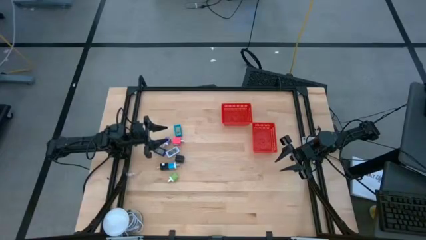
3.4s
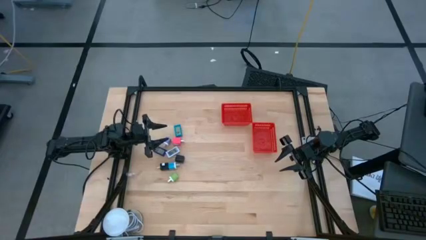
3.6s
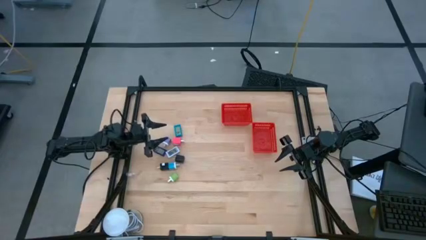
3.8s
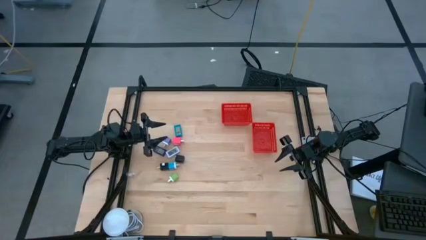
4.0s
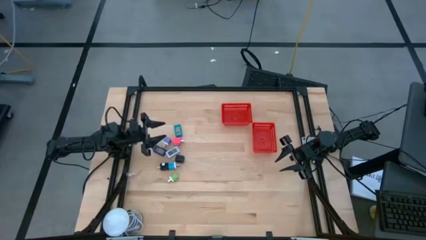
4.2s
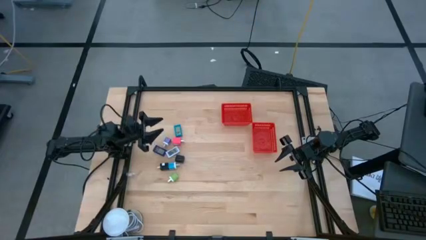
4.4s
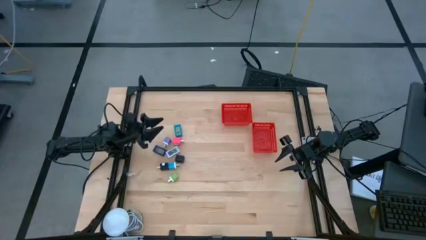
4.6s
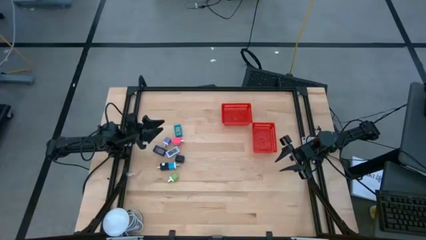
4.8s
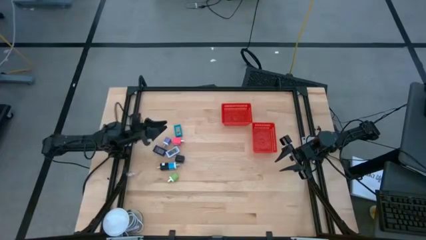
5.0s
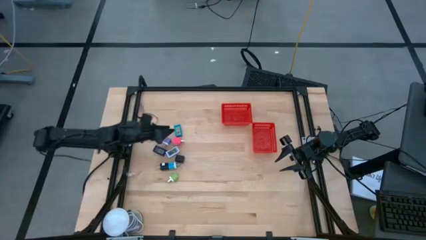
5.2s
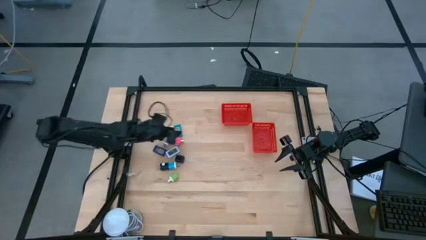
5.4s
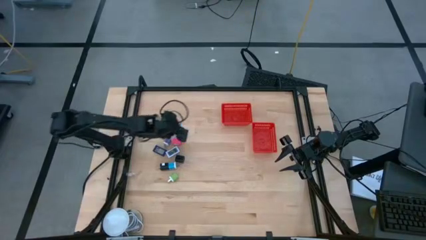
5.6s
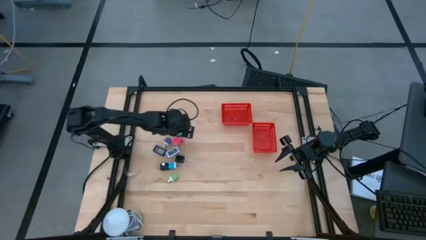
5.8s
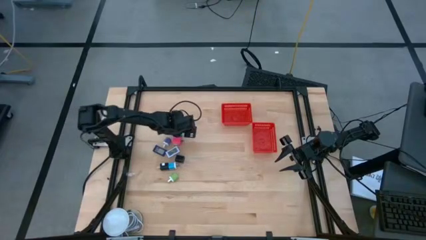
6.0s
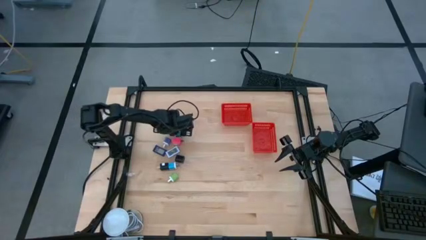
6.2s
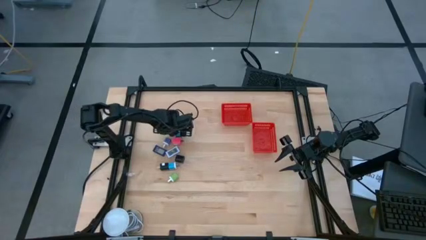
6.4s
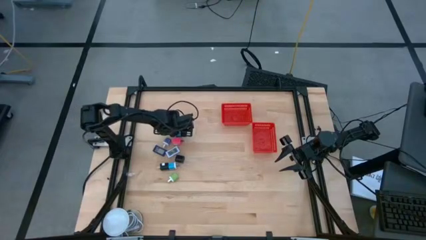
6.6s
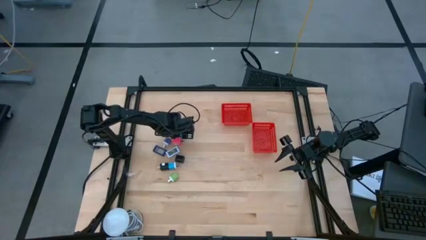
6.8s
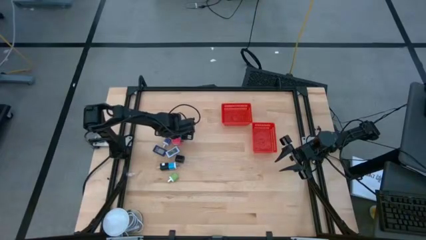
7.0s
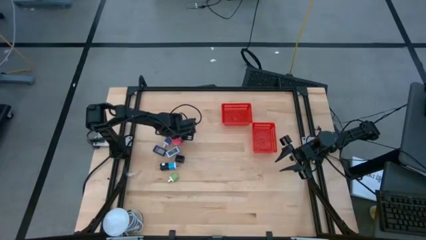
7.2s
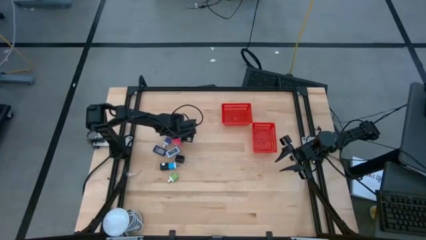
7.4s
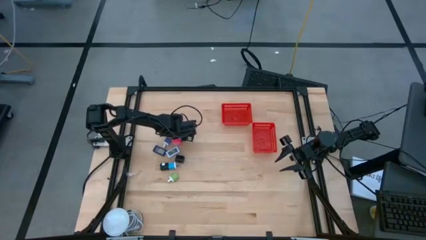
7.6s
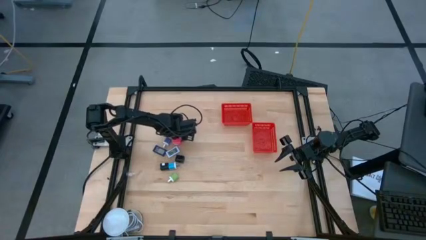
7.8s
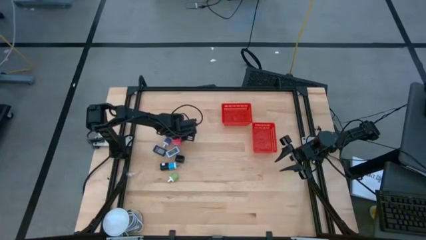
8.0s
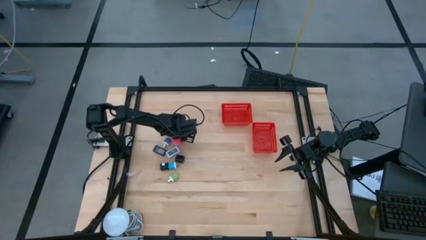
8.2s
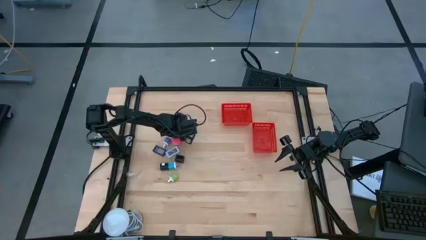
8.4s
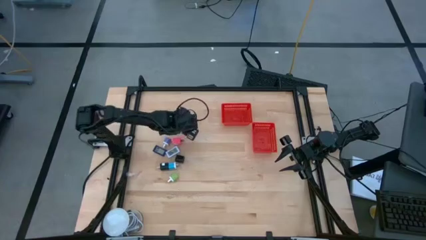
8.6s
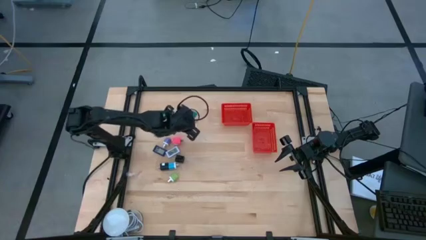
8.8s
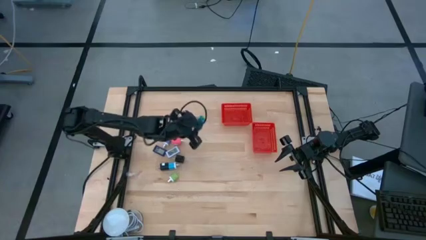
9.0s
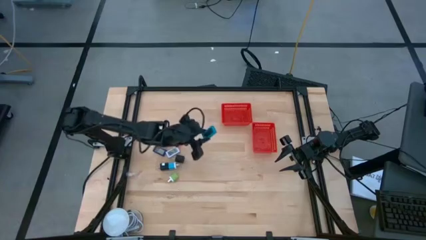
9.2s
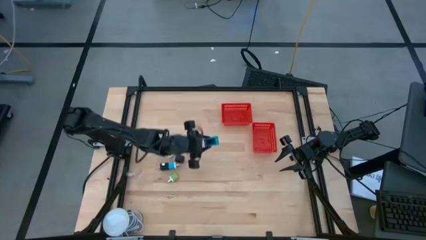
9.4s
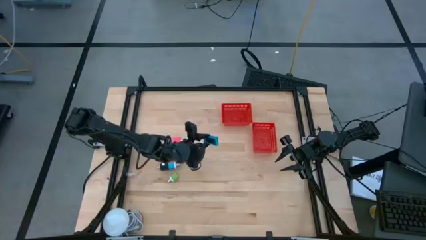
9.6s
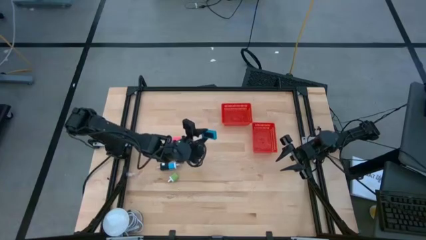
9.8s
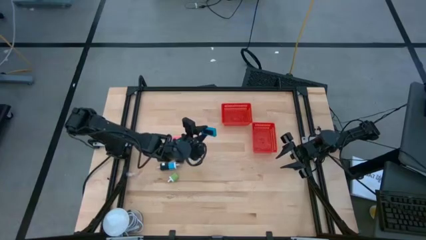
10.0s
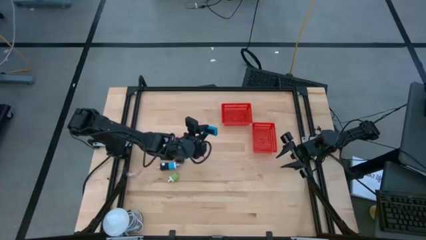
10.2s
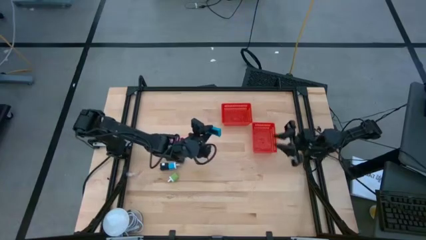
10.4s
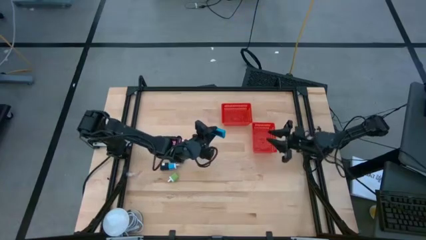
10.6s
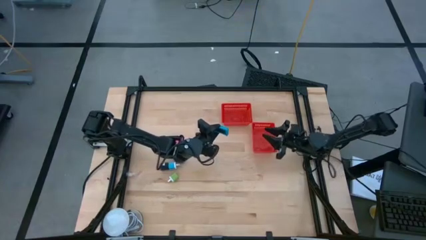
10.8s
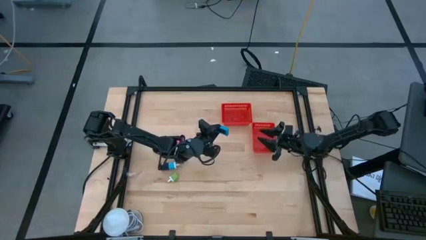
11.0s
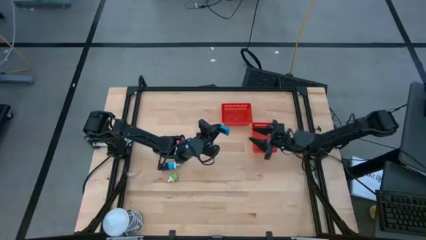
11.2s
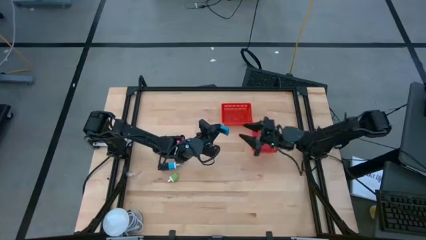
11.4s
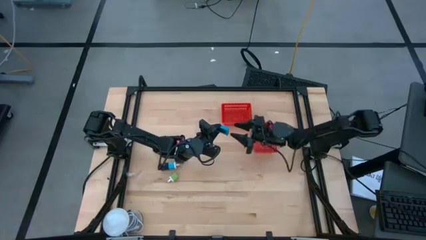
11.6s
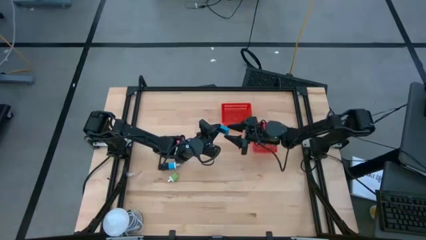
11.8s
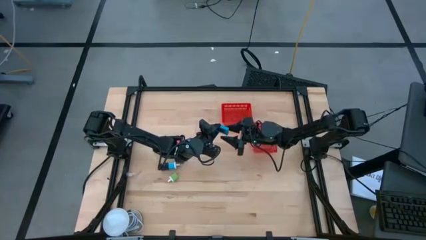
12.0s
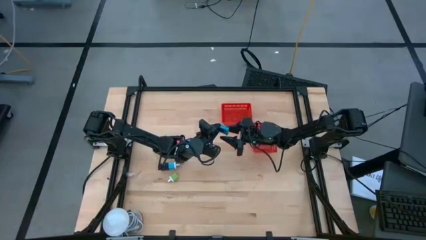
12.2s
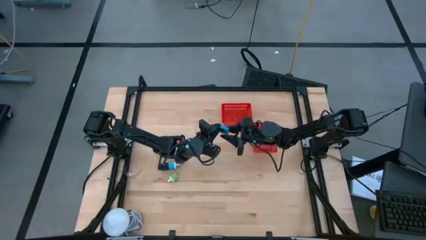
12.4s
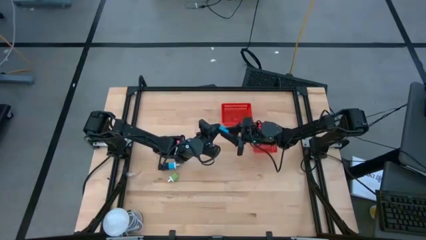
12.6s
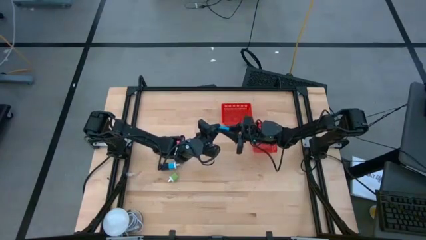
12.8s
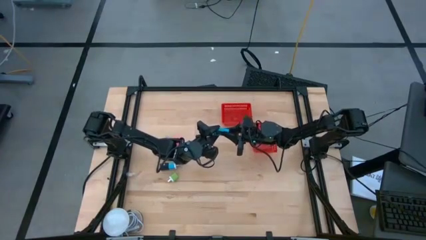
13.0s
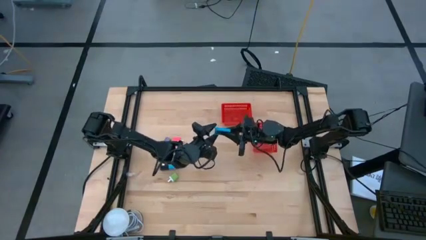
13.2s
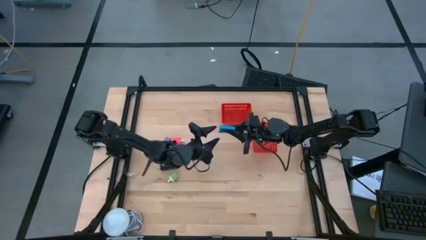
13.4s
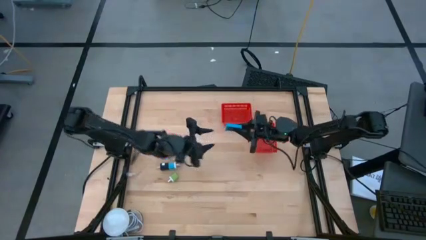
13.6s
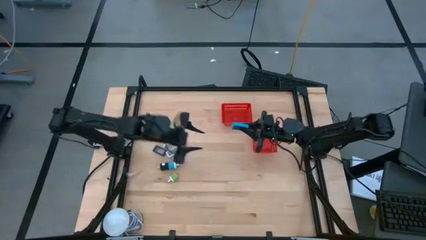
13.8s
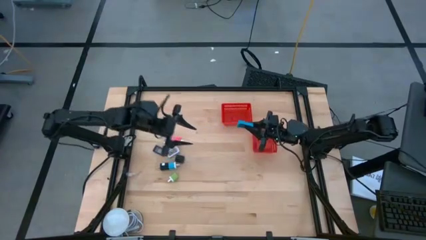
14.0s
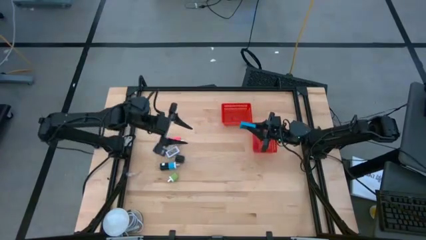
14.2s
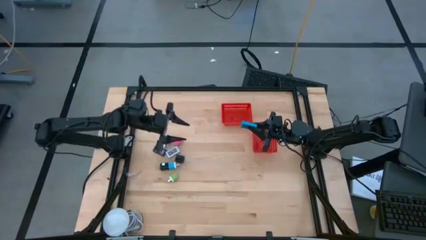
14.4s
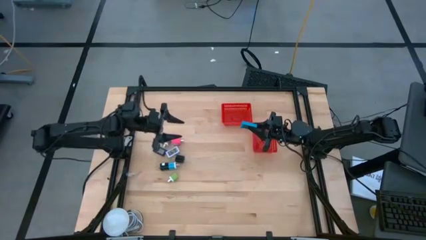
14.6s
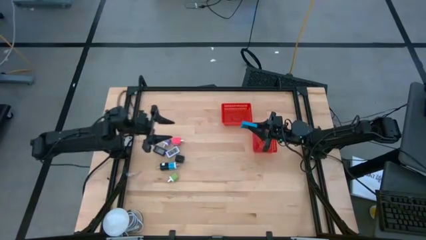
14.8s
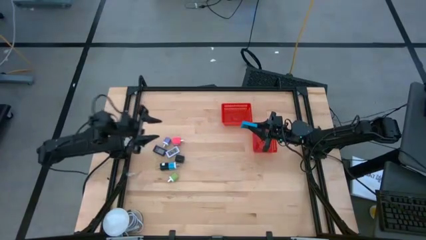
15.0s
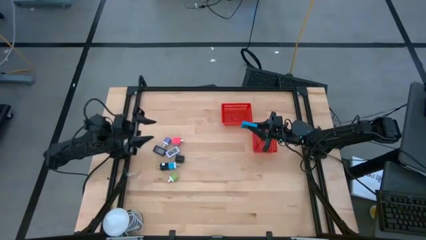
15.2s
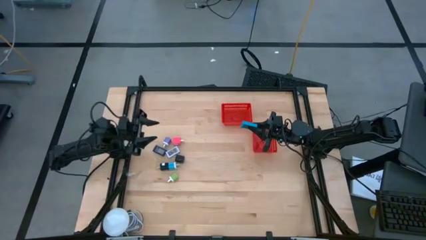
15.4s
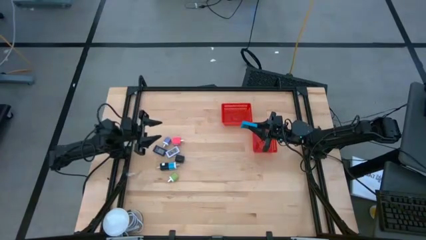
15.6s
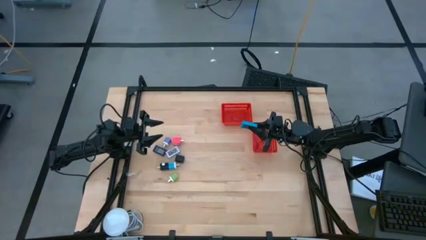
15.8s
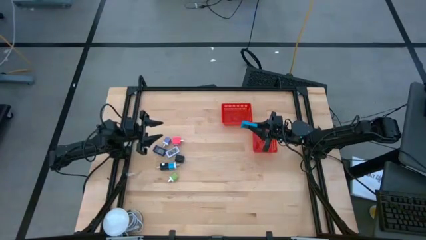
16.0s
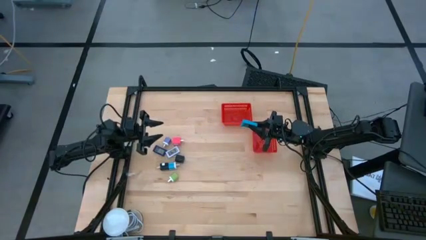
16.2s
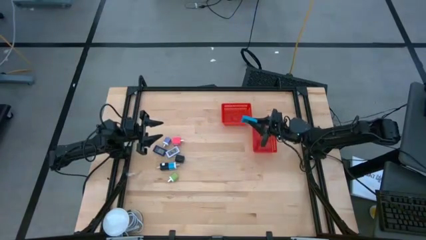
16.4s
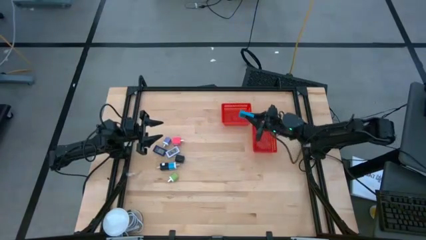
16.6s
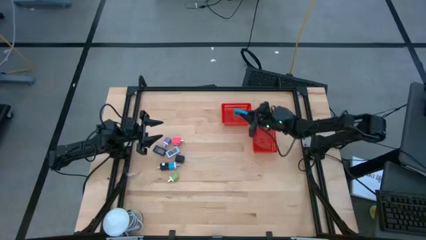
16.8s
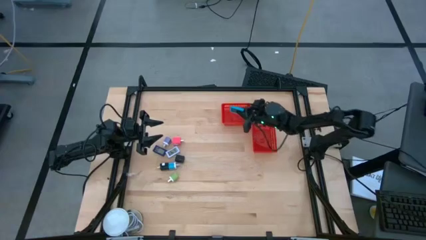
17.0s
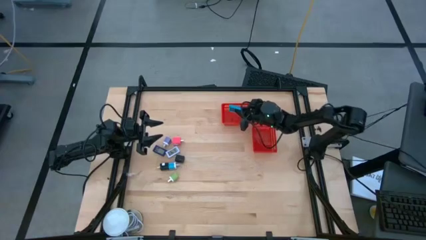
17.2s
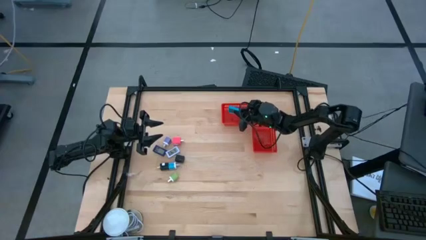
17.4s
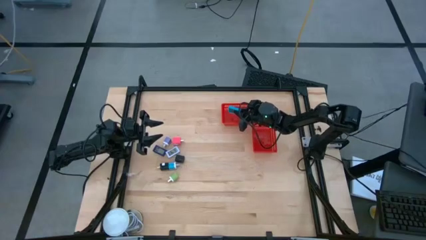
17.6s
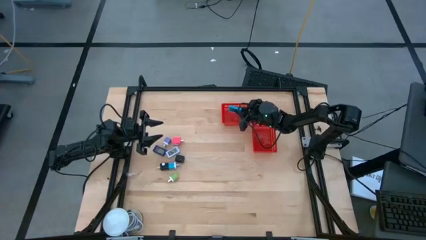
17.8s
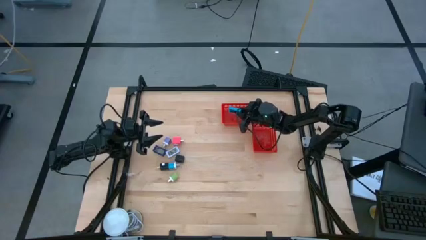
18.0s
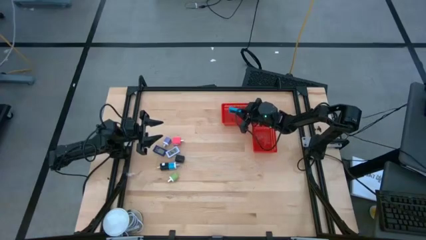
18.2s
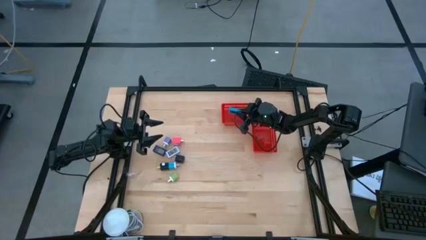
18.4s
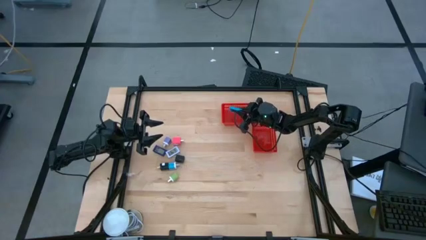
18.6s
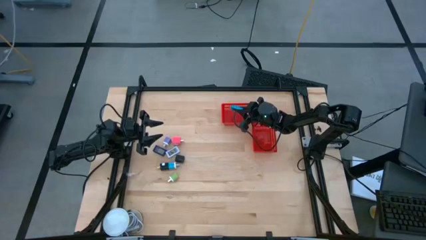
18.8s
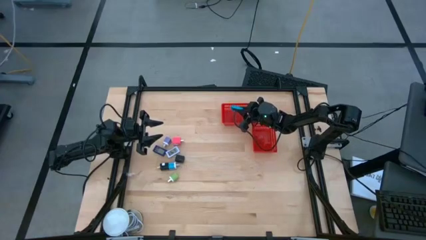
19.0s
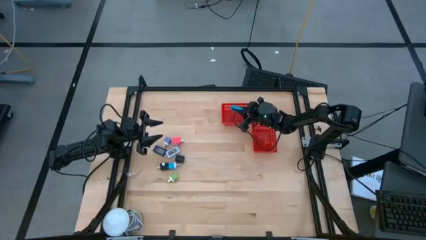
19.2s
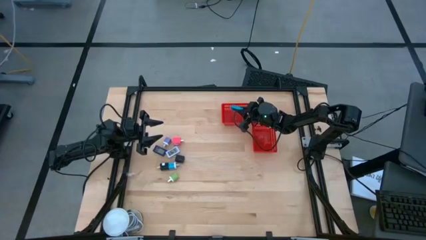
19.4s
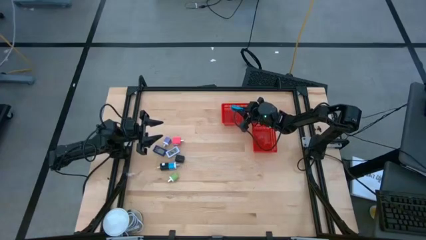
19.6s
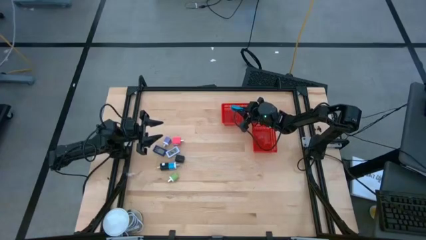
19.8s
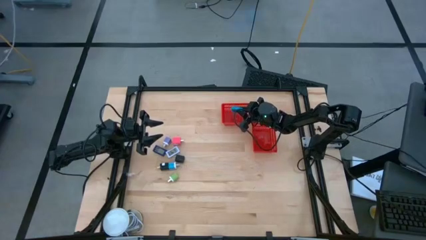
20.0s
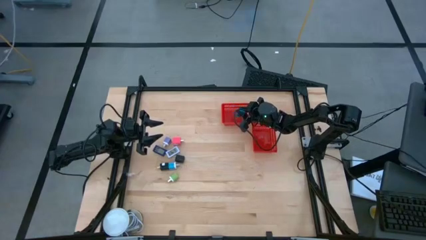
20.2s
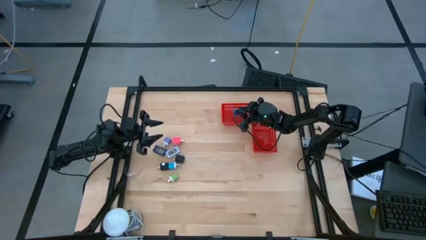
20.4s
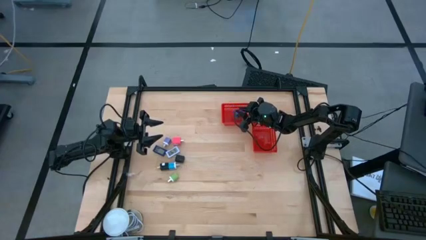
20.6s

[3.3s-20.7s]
Task: Pick & Place Office items
Put the blue digital clock into the top red bin
